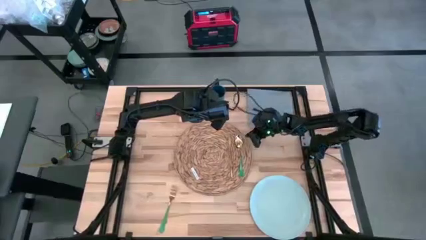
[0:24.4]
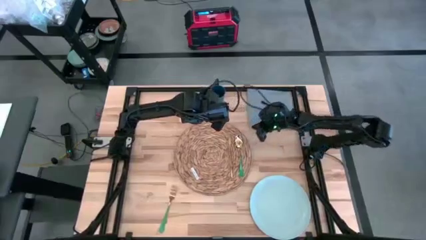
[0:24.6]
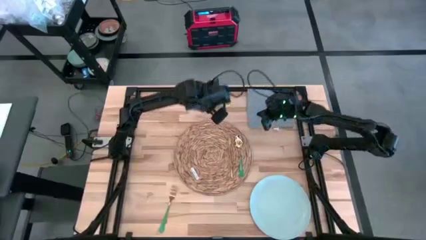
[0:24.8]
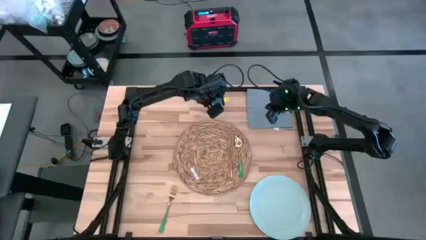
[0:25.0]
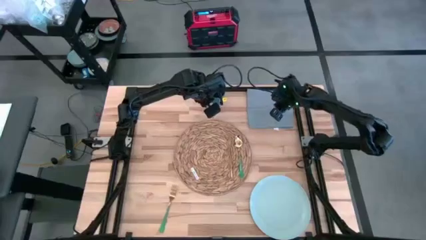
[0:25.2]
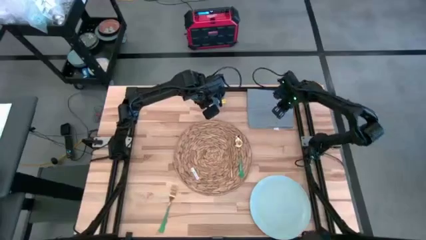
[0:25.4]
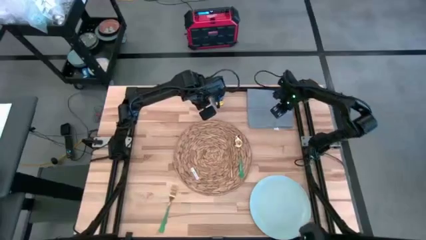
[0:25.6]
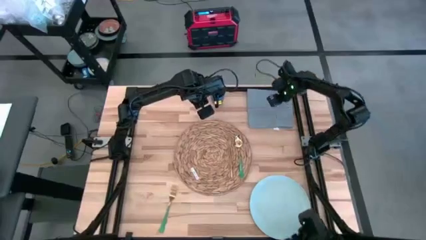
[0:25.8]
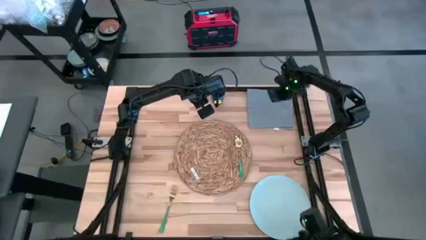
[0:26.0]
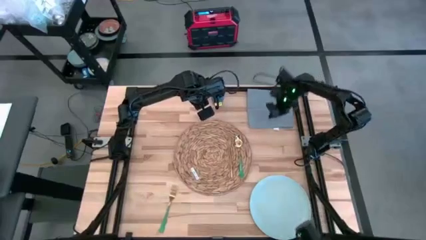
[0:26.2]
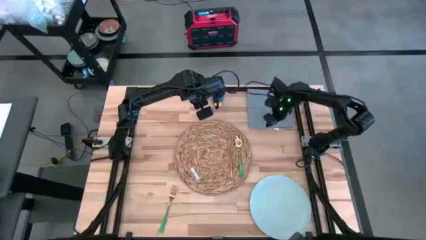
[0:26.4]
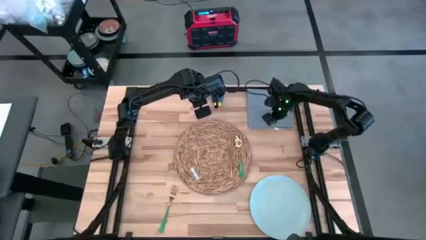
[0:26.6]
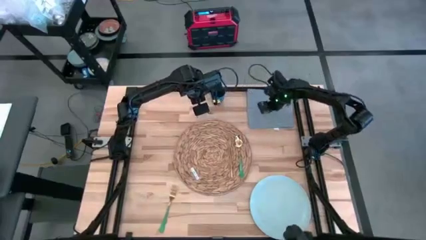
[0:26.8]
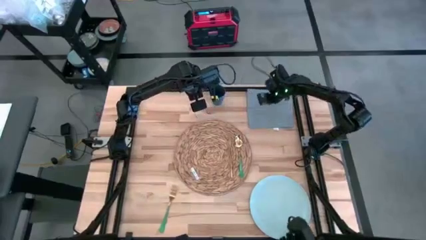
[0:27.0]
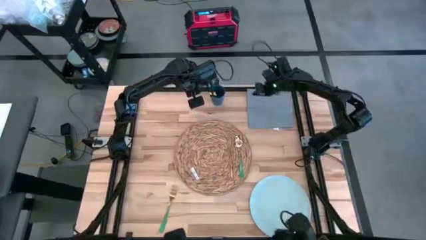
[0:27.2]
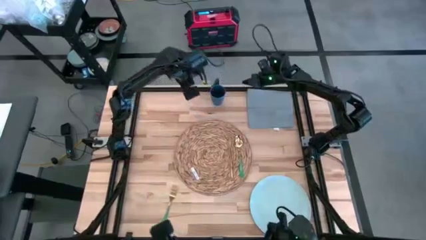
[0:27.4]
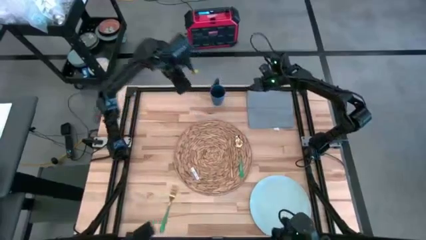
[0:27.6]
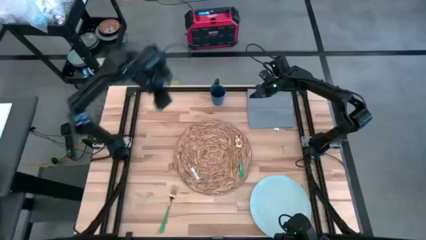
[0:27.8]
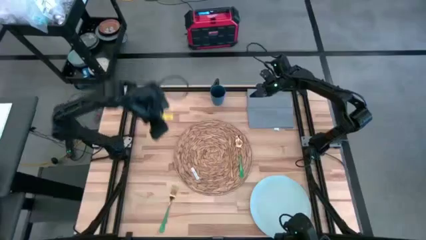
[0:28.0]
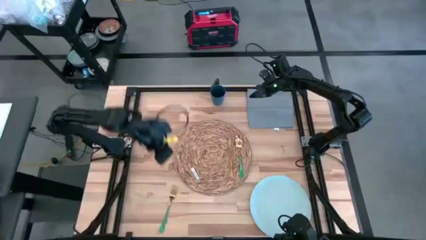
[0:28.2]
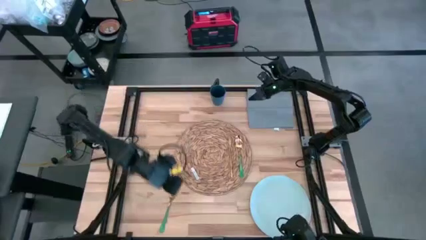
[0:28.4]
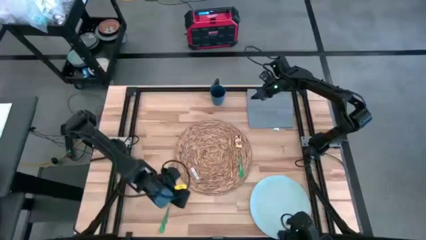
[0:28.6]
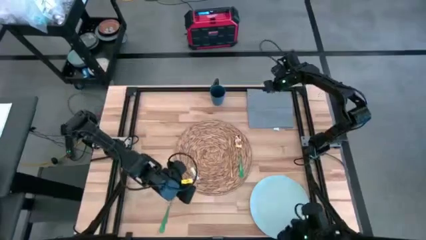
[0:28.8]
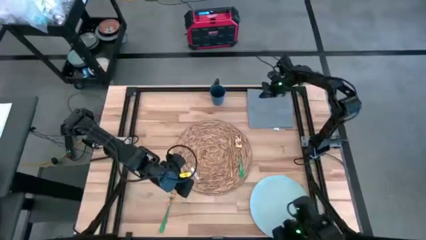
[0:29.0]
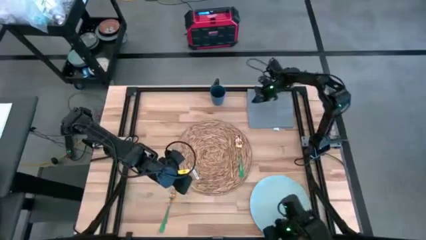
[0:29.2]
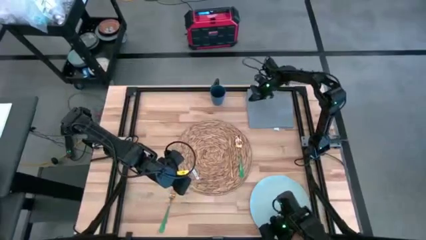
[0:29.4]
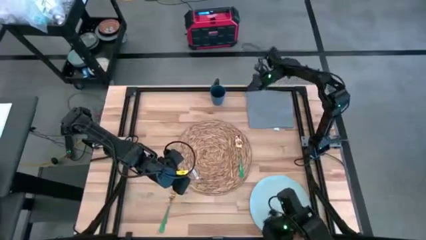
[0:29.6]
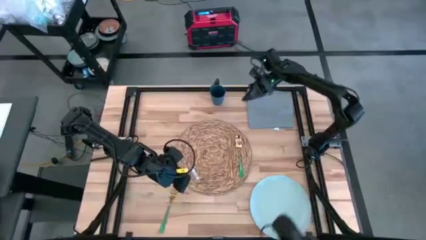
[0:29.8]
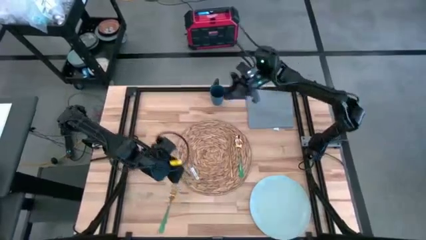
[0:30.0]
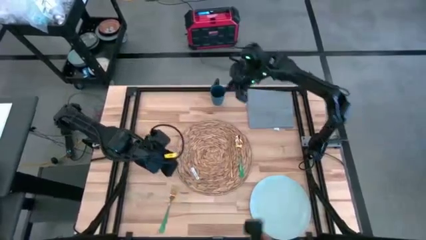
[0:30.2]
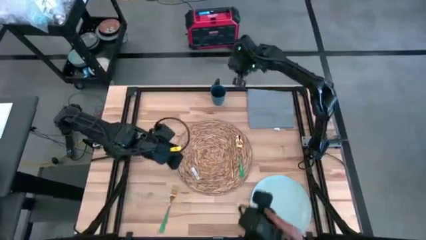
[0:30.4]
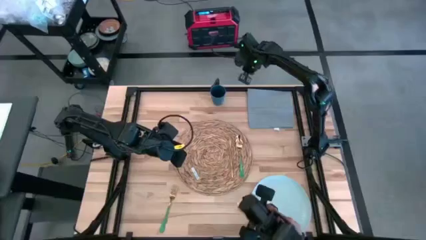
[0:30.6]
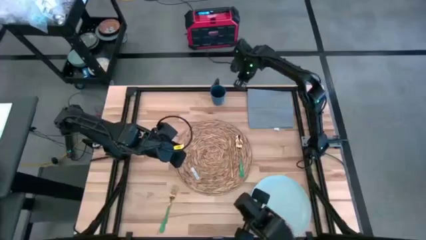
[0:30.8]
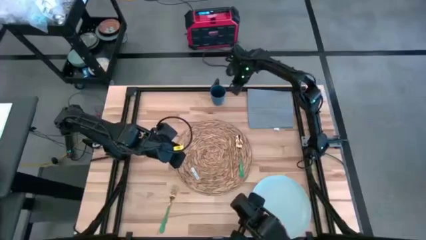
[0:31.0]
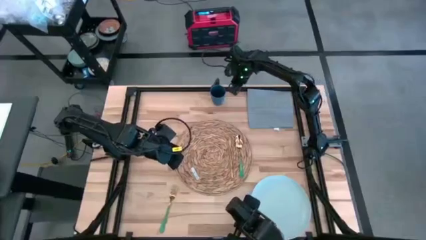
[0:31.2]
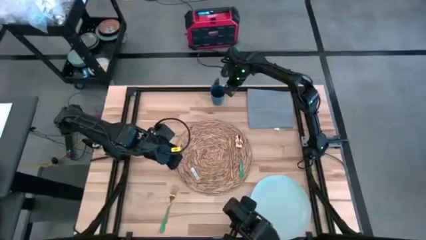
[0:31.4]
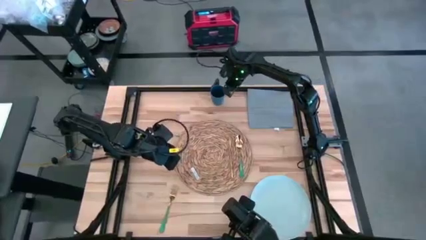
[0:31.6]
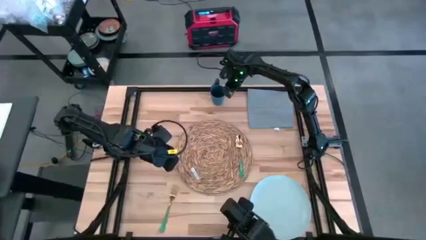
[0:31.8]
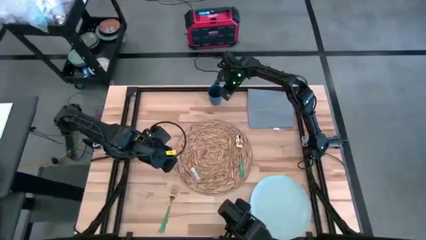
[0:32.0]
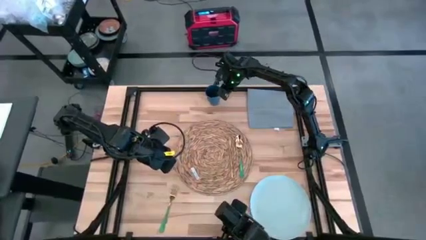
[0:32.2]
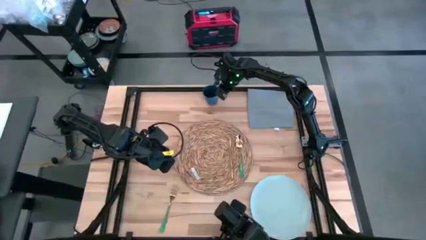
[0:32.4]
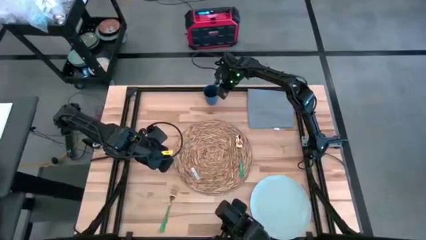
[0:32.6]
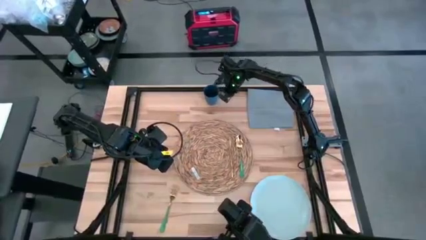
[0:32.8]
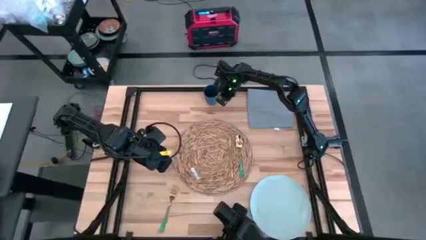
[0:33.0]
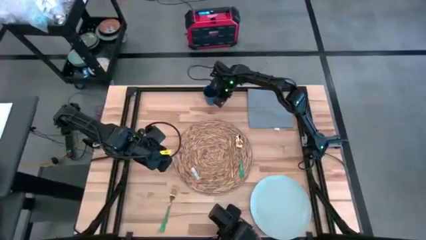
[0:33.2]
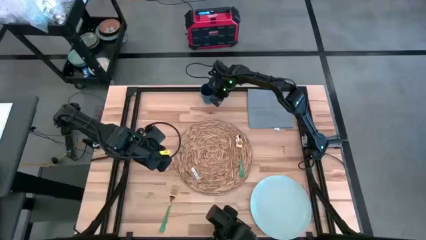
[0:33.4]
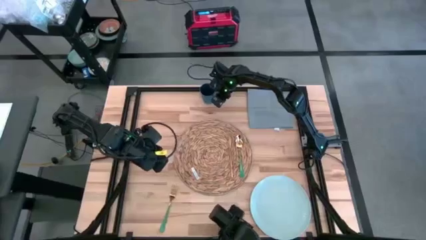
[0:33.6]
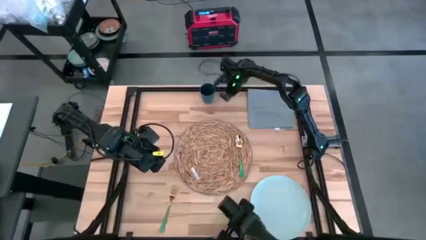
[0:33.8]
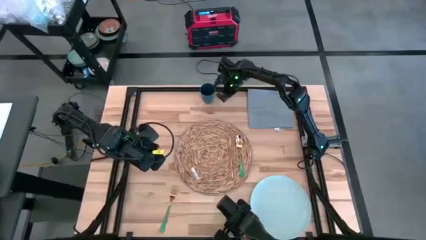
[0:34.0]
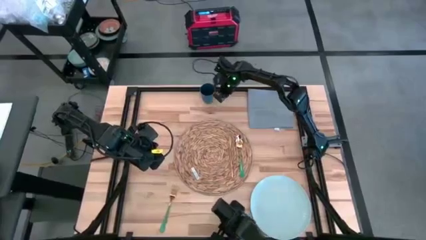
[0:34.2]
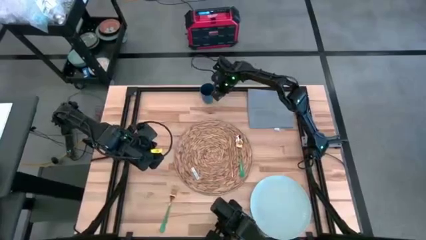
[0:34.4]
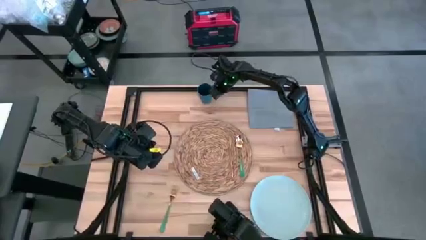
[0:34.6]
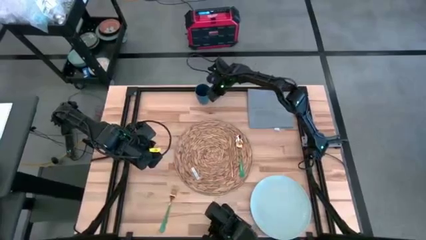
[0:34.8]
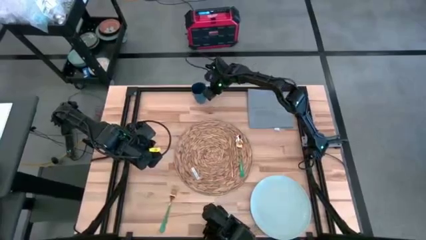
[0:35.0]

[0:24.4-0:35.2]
Task: Set table place
Adjust the blue cup
